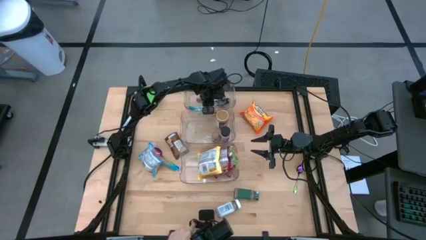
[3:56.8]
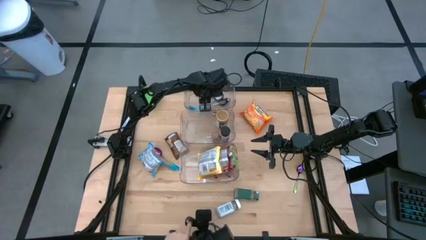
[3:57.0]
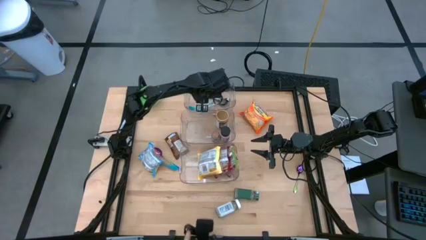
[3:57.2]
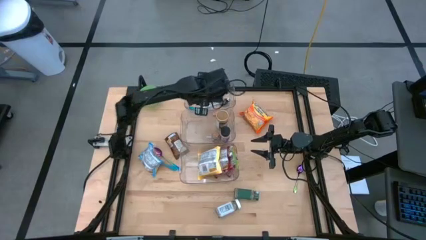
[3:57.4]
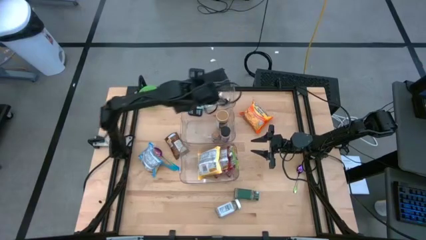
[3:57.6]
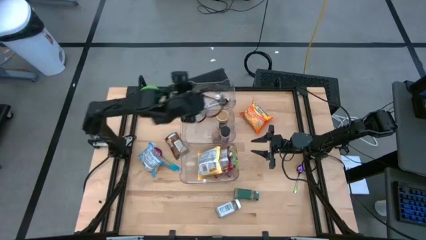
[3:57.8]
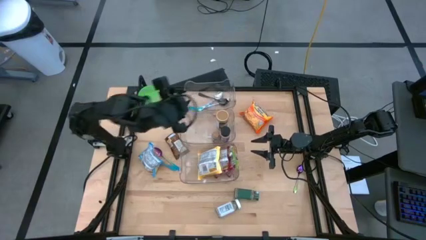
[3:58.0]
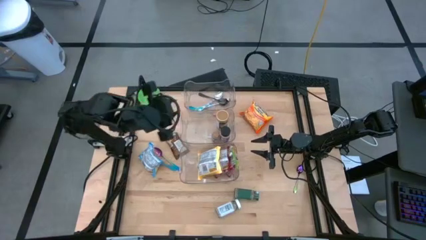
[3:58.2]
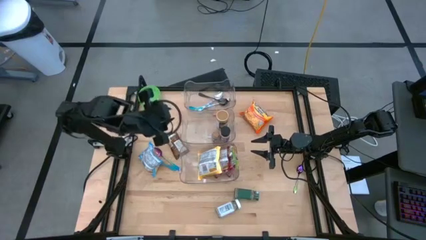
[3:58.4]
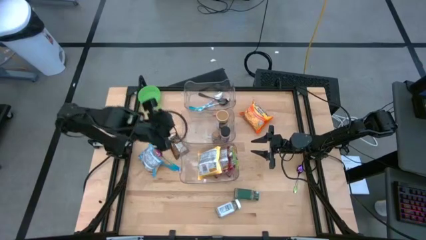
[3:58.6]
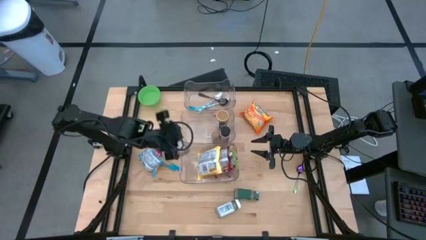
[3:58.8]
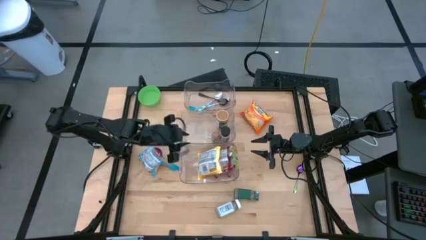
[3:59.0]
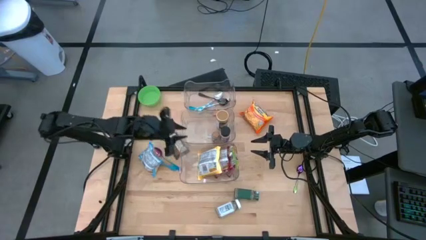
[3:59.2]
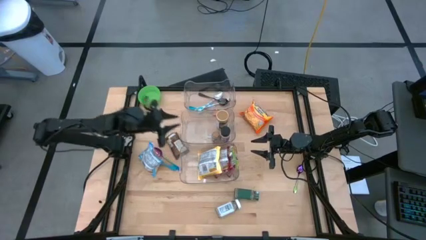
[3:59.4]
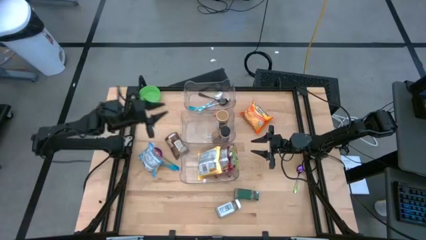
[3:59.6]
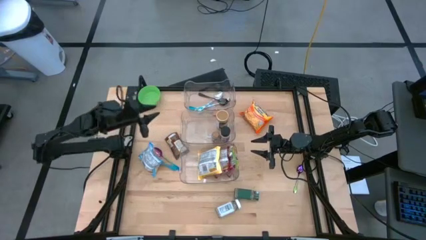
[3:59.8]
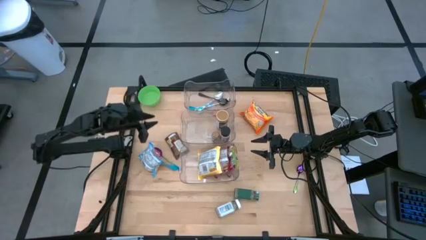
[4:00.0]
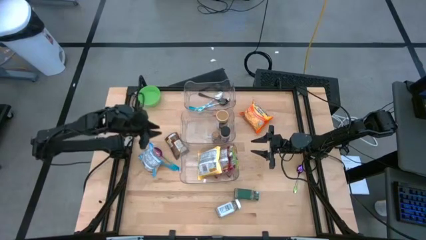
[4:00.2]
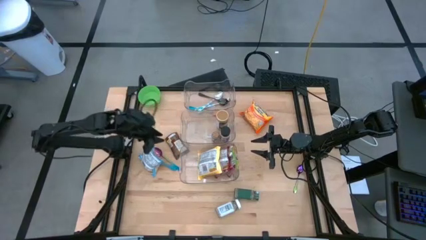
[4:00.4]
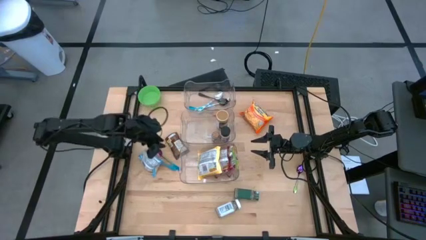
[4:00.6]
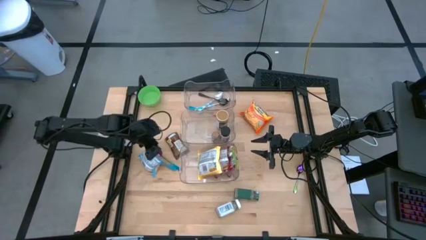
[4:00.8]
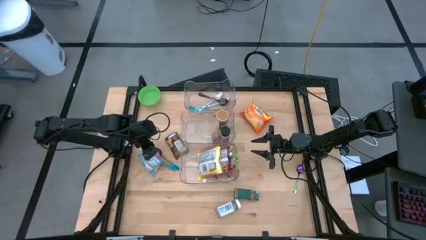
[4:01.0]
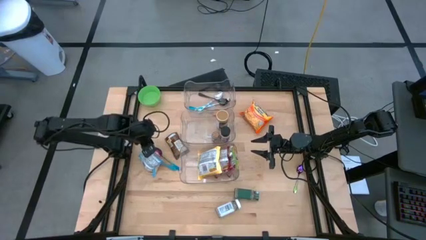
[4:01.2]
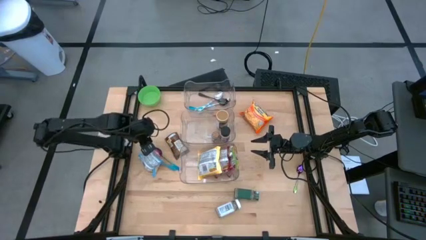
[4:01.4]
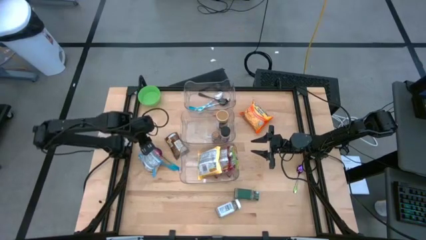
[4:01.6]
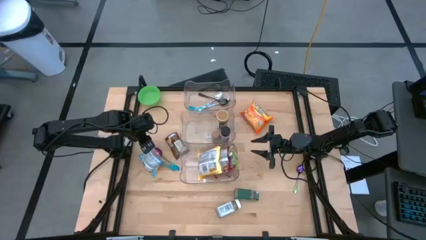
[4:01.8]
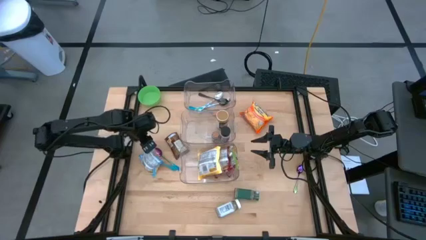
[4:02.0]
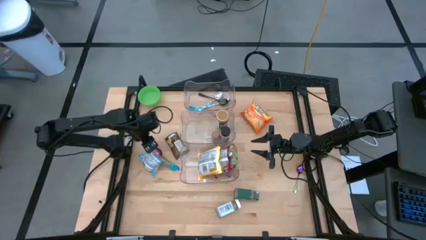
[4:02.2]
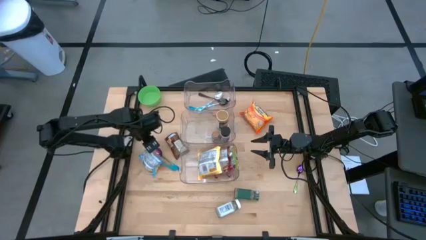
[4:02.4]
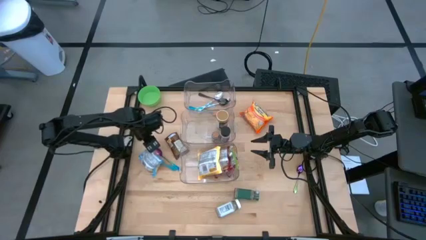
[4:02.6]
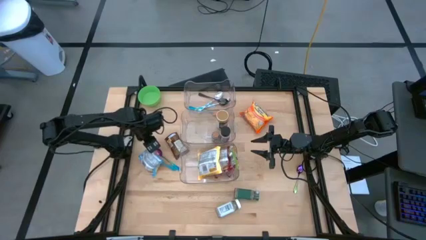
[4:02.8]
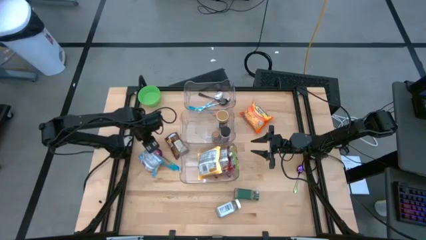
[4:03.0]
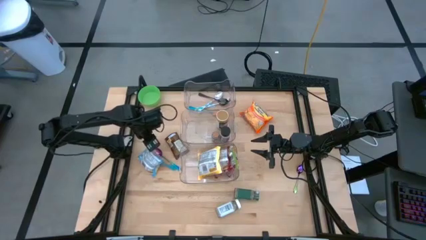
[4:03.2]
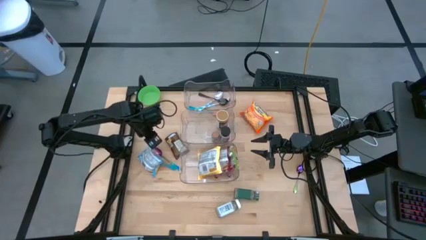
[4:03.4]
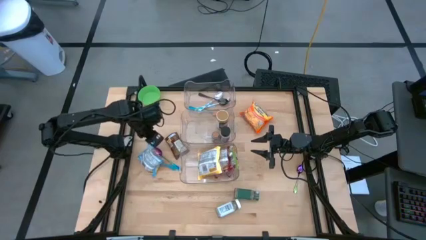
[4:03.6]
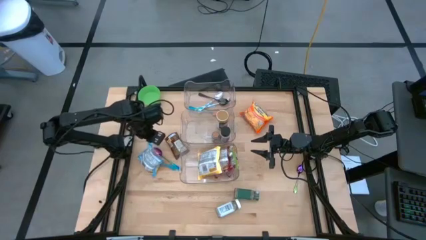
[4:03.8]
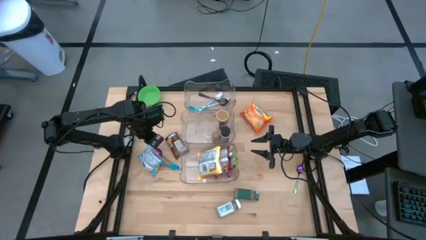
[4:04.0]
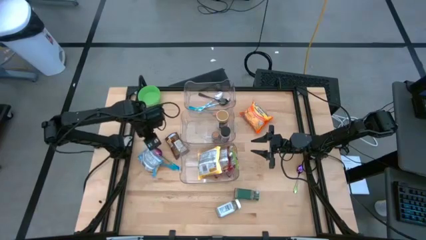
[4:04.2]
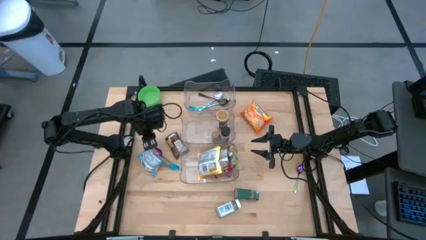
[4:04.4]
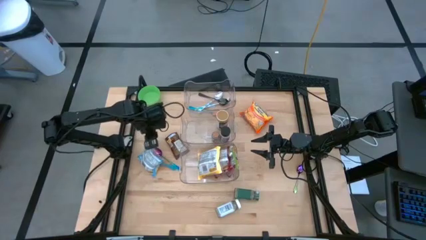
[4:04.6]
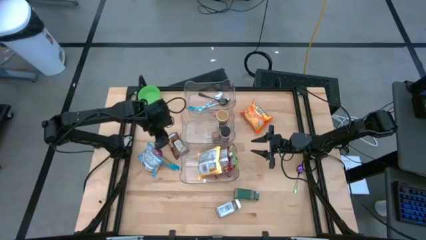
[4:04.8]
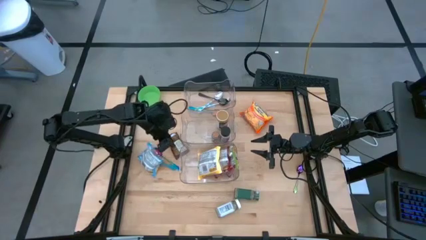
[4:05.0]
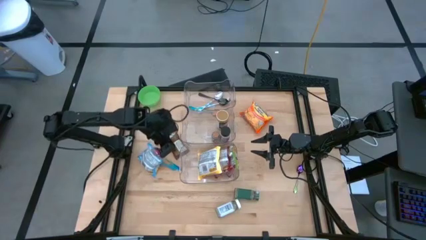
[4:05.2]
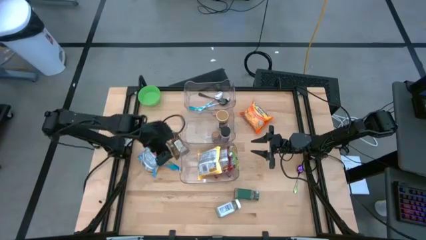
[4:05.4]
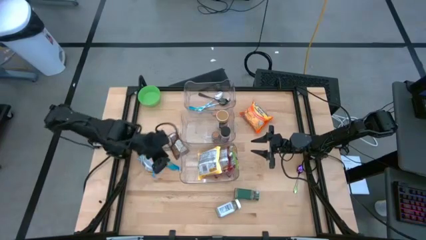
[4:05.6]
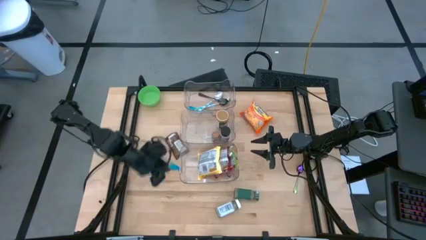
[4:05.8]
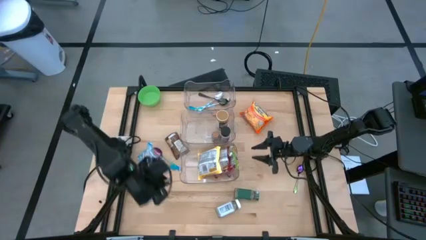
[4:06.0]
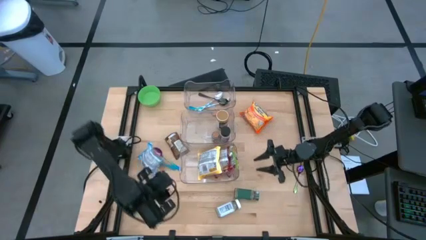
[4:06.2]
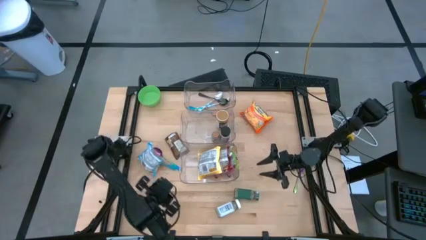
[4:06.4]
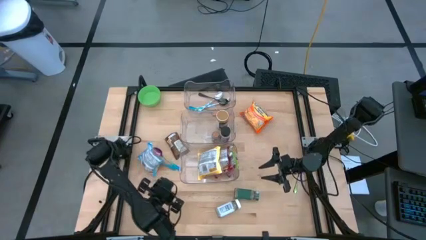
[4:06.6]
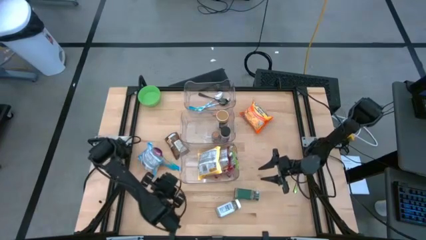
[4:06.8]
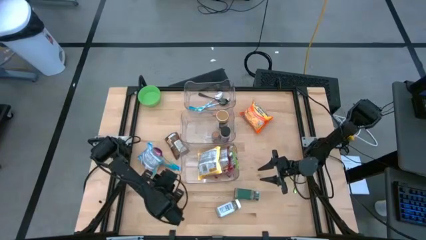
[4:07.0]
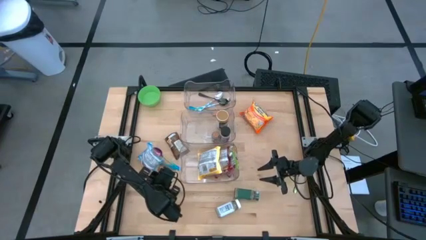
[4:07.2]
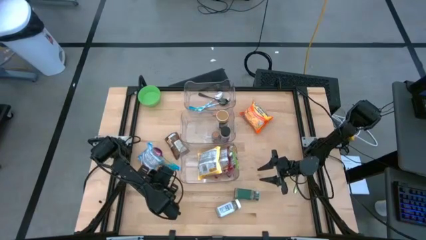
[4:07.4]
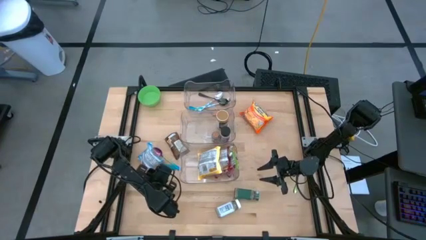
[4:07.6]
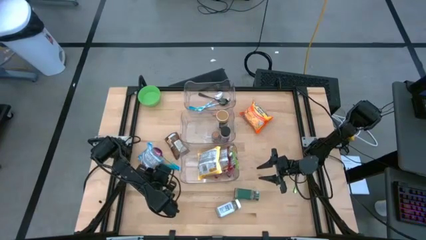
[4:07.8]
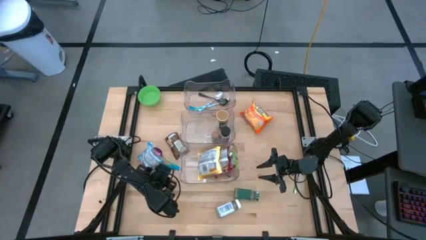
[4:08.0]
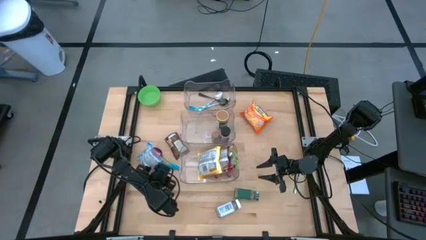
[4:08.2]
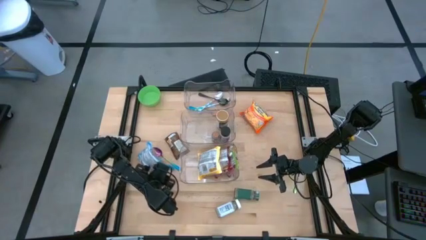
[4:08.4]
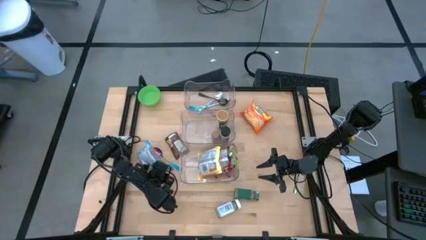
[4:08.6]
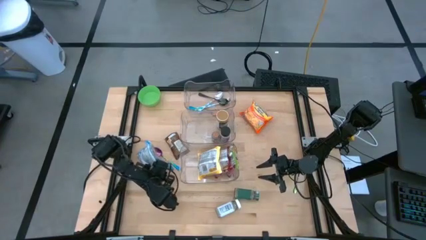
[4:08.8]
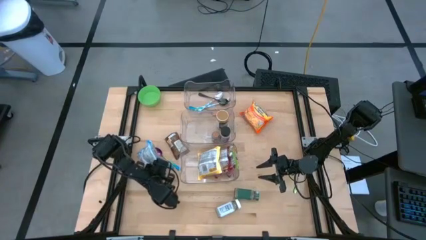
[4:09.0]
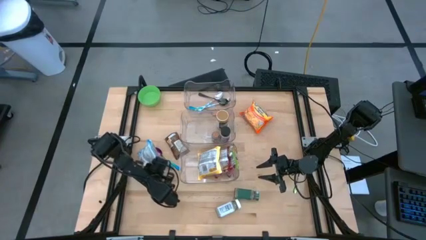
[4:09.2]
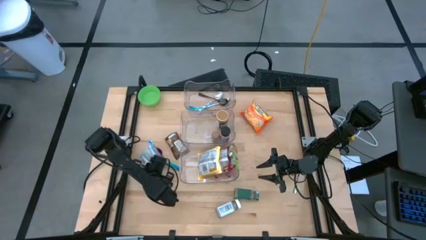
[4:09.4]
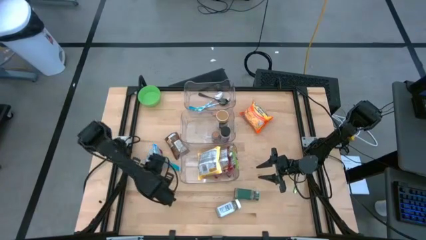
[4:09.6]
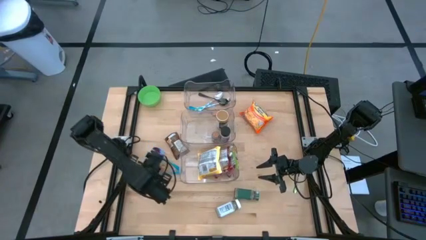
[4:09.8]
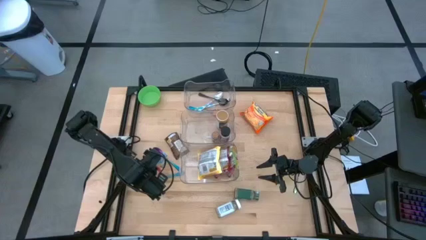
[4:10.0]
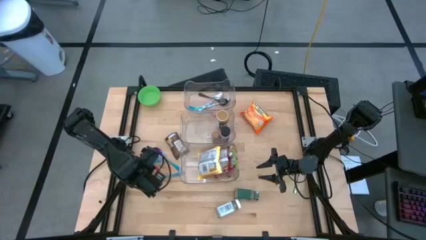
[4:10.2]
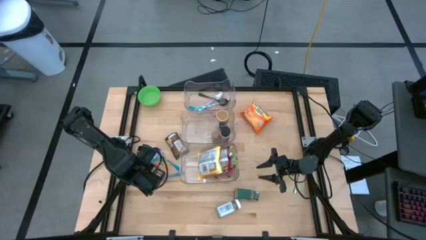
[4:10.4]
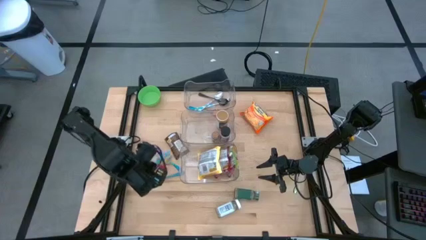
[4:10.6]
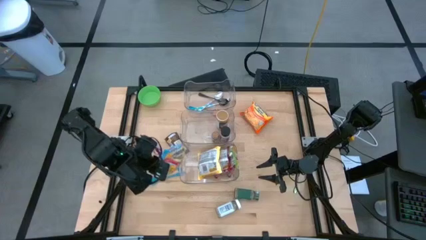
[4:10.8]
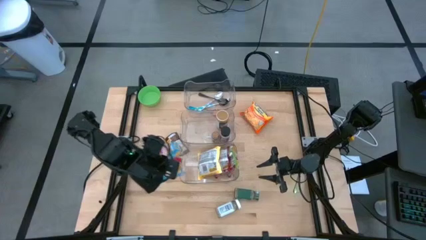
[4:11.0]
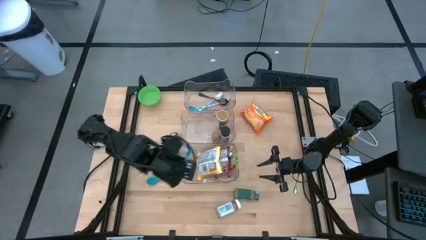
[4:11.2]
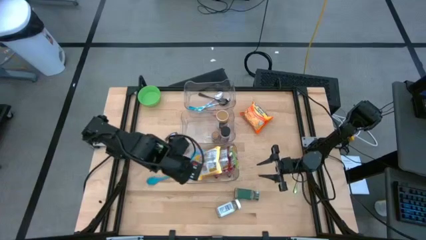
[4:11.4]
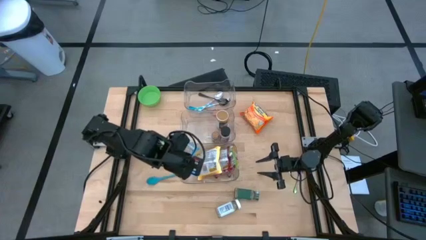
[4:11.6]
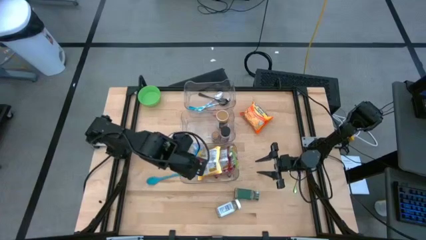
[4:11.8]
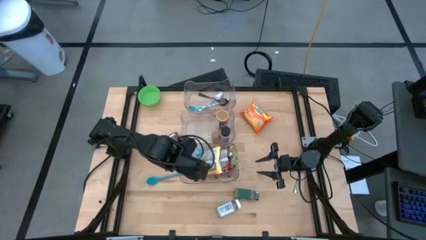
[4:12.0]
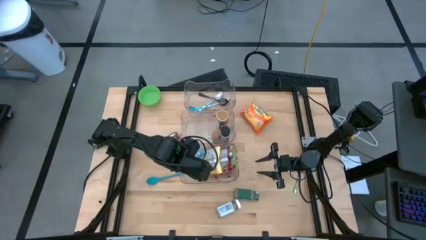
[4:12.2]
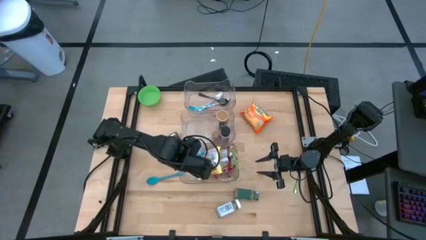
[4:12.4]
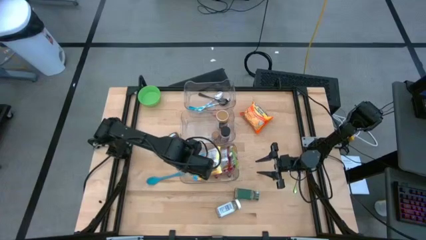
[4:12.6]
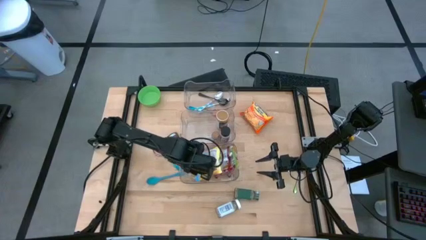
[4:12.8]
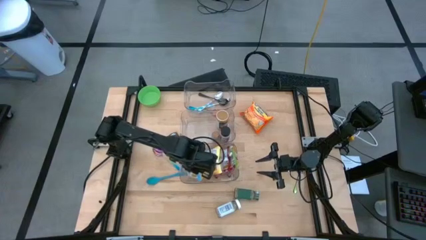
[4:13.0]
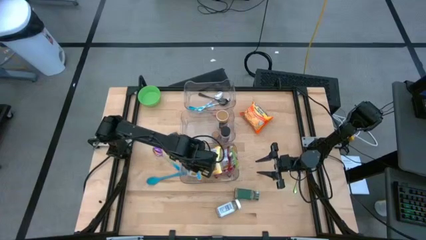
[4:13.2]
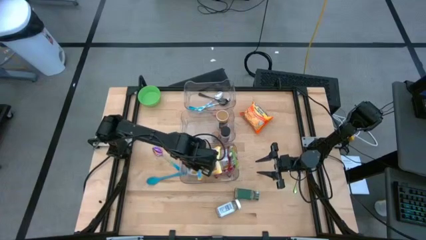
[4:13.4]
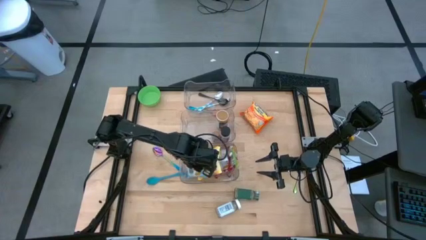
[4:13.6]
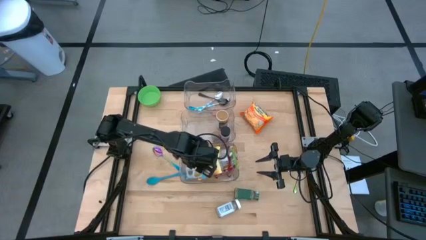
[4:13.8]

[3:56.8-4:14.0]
Task: Pick & Place Food Item
Put the blue noodle pack into the bottom transparent bin
